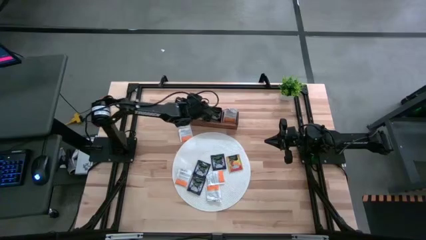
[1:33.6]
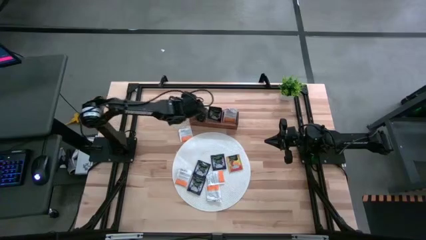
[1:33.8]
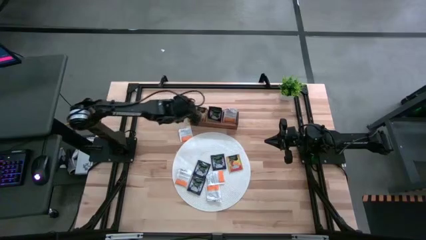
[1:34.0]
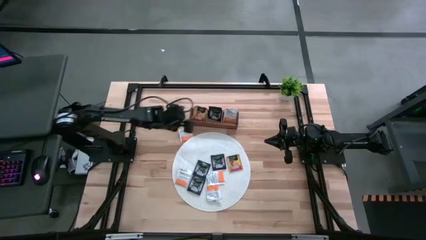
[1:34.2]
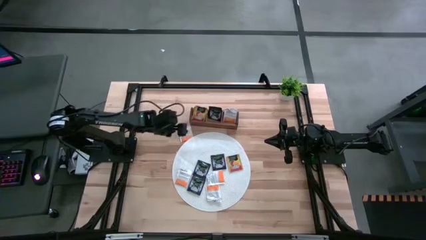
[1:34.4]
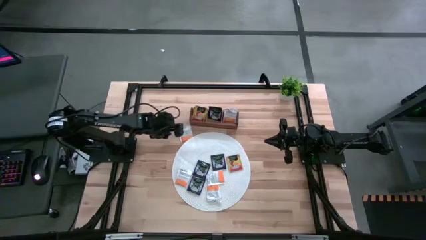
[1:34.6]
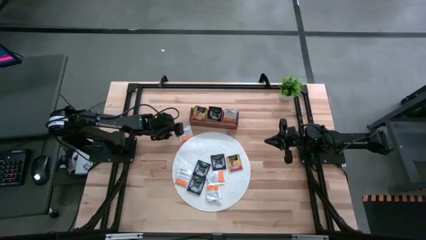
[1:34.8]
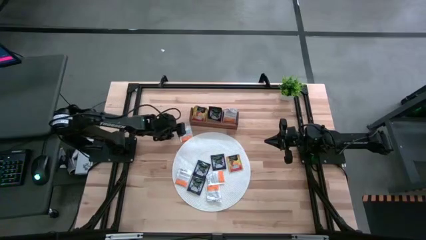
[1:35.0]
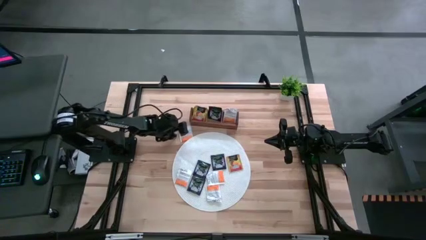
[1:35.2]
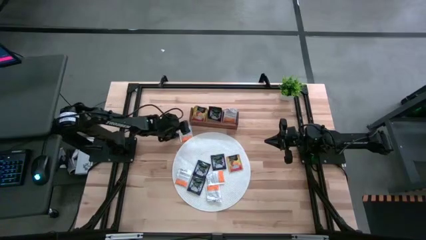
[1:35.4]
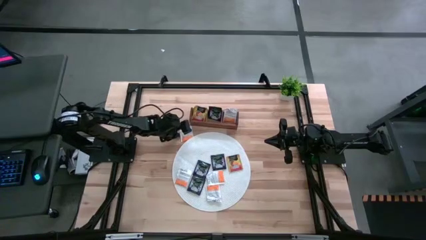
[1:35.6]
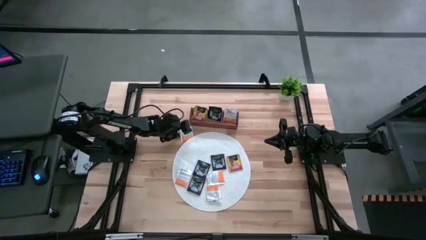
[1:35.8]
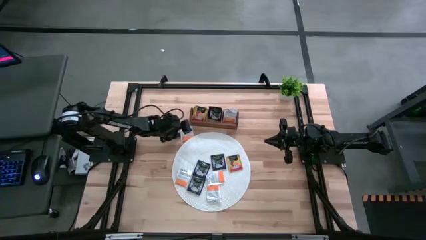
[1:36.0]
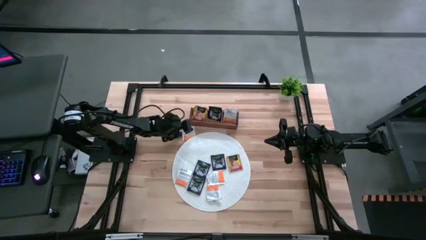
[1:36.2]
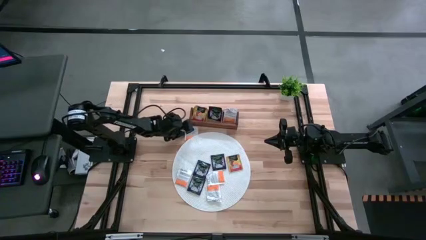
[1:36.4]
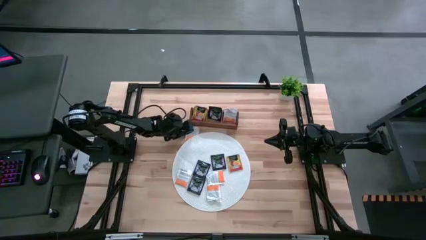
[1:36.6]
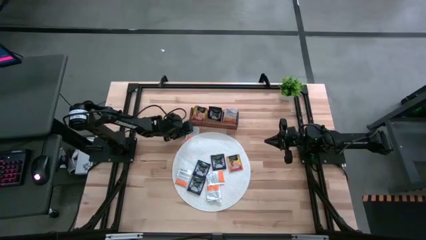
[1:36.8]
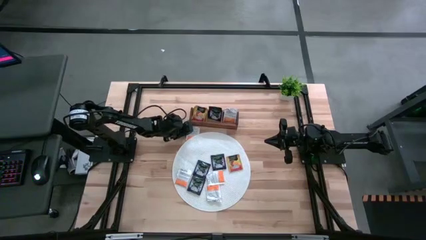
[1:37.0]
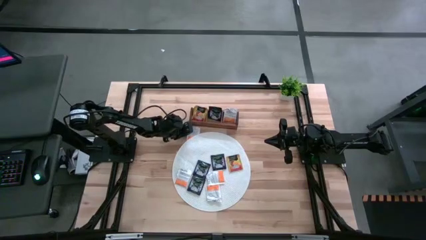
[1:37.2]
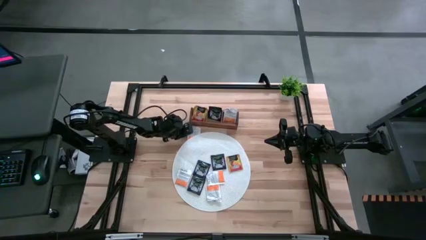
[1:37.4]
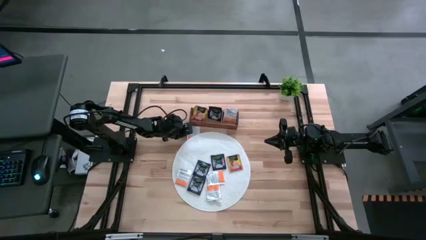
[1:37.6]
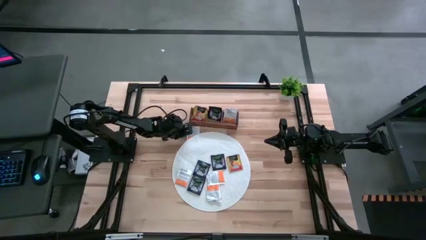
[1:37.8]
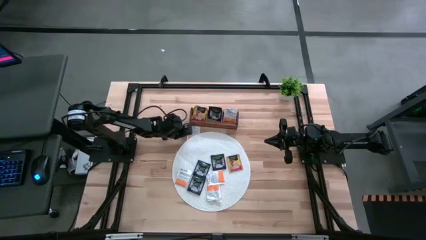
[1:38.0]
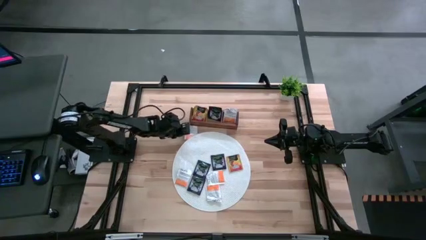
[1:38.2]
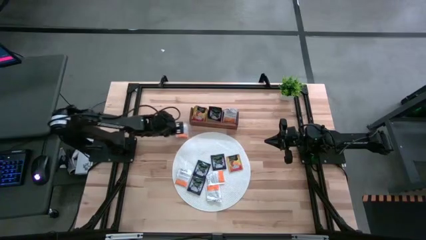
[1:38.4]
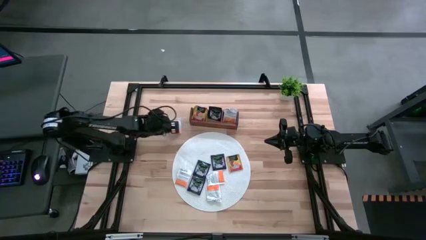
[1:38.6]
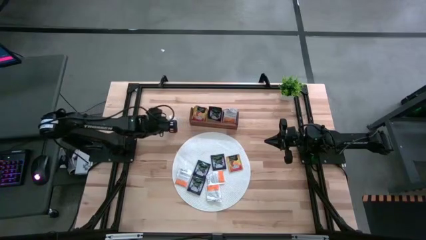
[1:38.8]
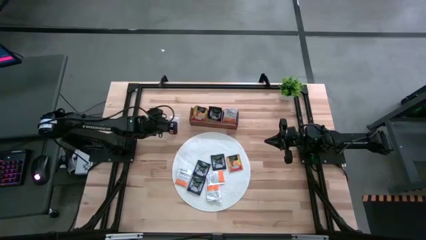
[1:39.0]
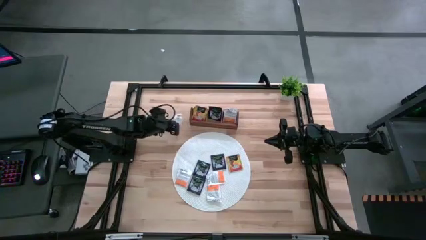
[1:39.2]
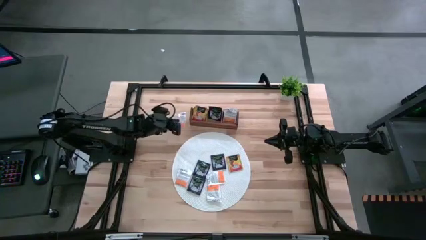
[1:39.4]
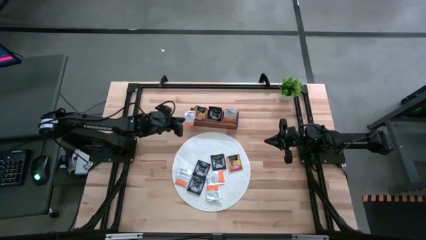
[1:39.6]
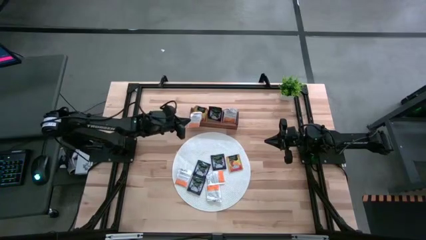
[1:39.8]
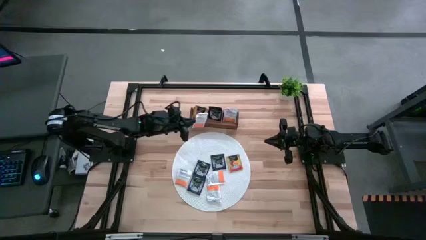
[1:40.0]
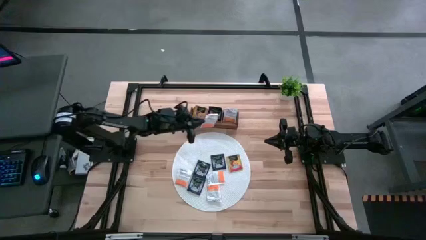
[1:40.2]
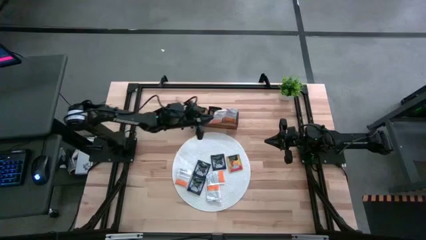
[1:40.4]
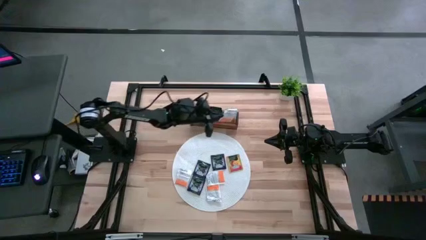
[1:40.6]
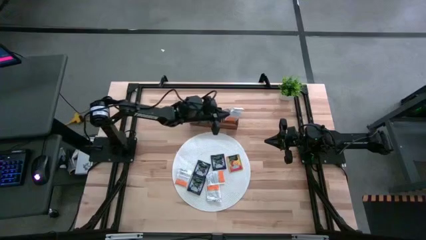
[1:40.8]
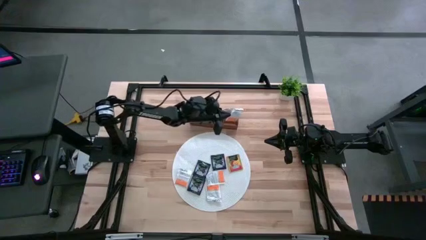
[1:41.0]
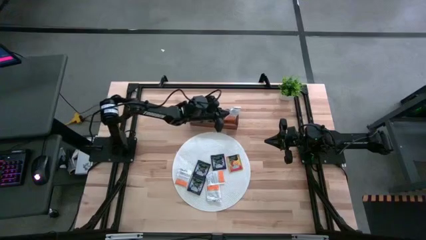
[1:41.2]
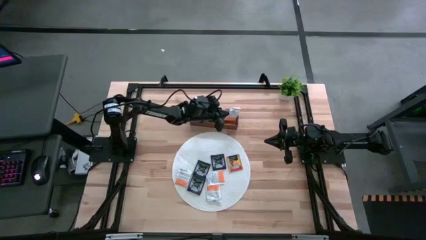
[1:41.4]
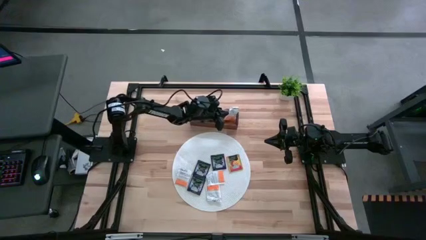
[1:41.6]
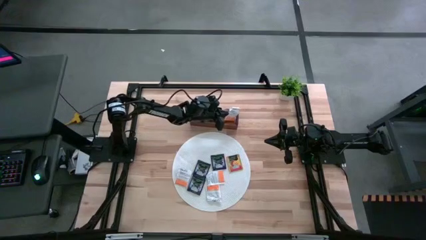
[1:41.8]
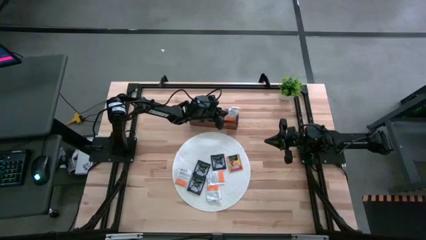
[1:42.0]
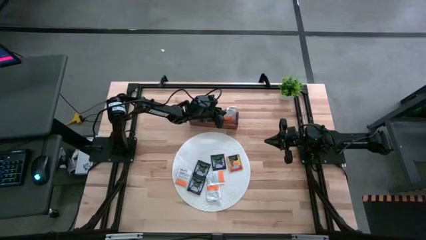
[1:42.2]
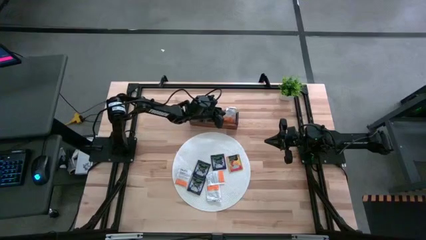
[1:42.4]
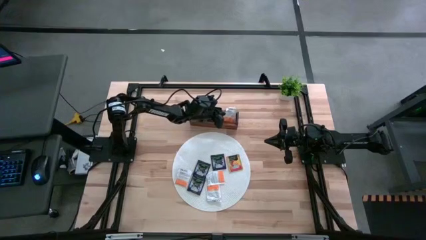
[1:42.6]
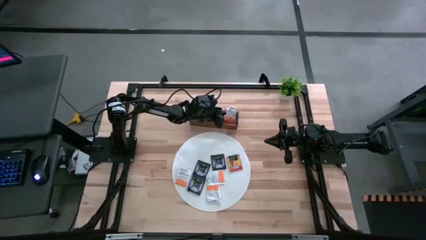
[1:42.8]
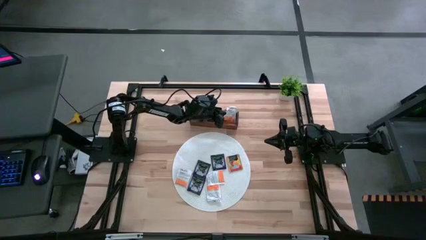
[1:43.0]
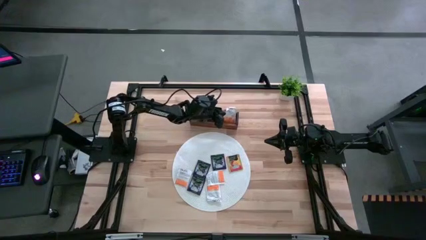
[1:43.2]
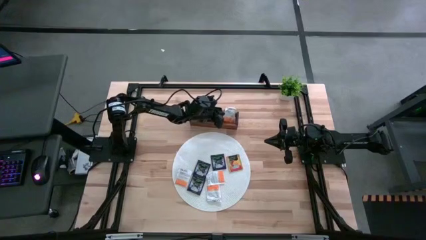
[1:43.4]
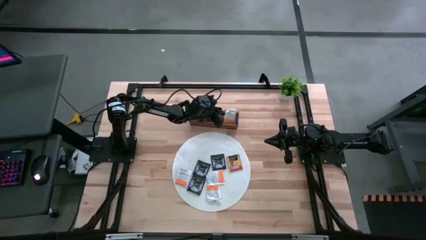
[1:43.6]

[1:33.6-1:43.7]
Task: Pick & Place Tea
Put the white tea bag into the right section of the wooden organizer

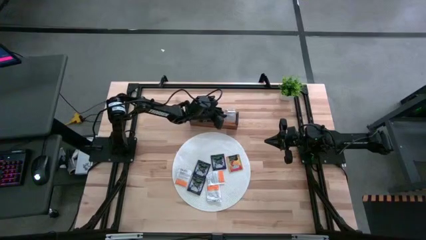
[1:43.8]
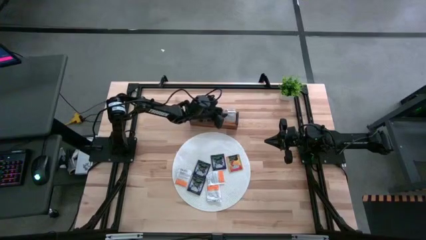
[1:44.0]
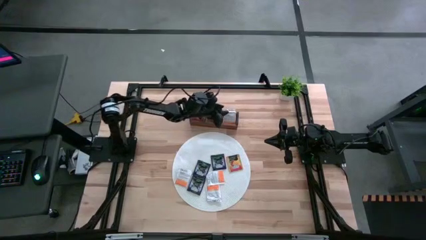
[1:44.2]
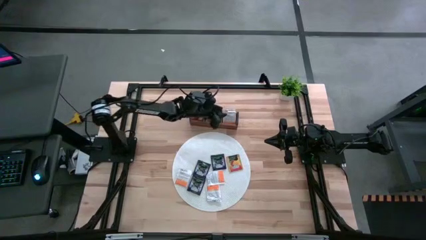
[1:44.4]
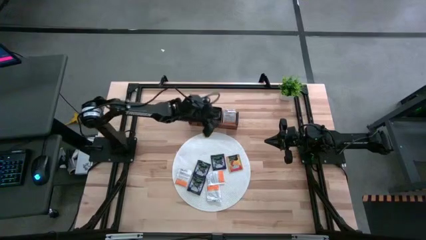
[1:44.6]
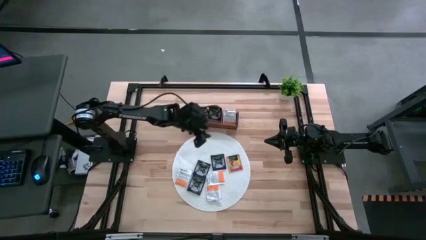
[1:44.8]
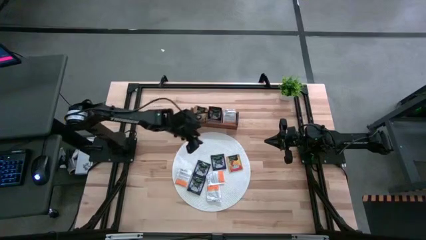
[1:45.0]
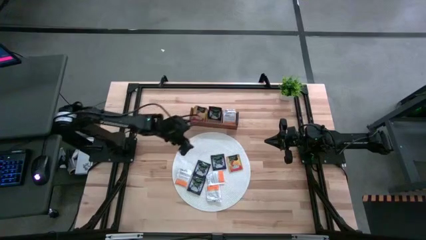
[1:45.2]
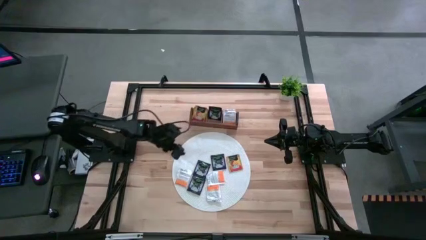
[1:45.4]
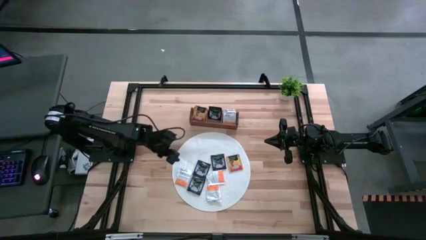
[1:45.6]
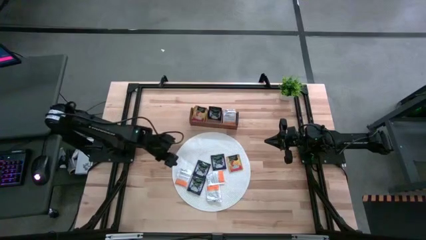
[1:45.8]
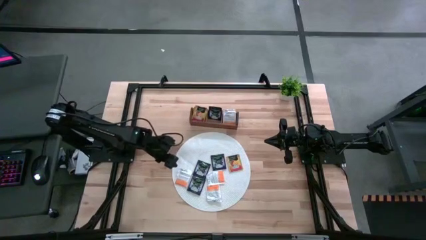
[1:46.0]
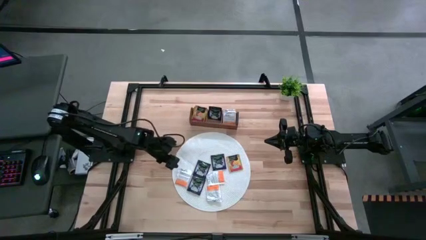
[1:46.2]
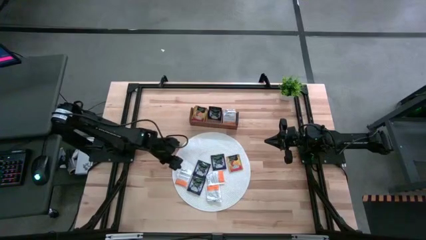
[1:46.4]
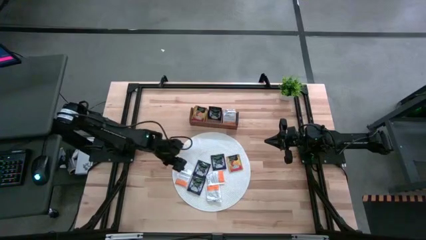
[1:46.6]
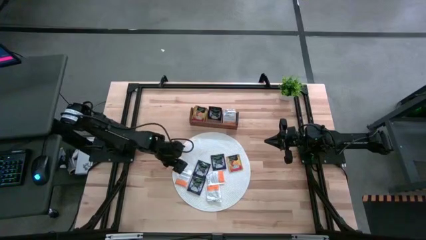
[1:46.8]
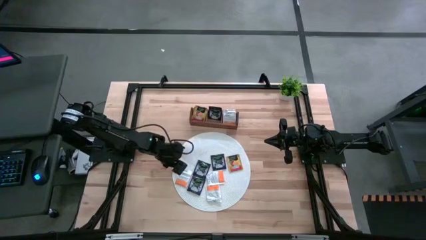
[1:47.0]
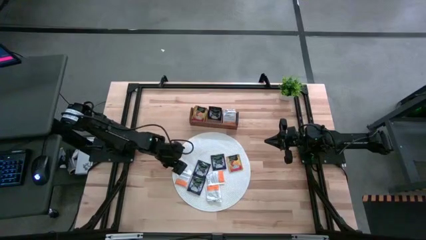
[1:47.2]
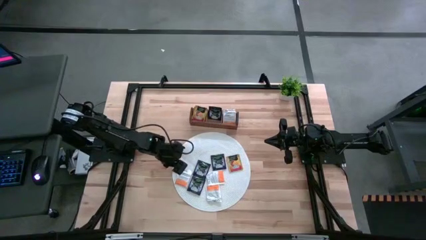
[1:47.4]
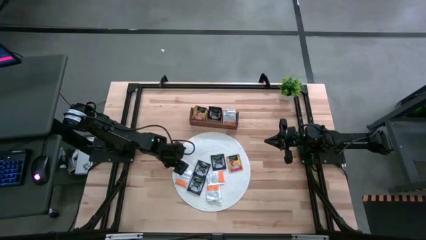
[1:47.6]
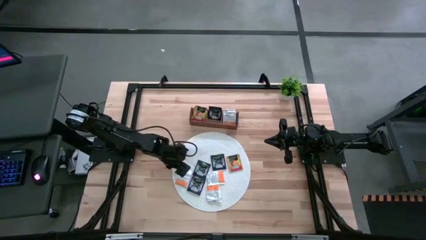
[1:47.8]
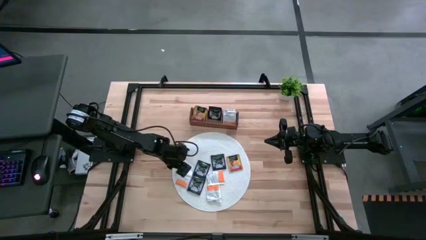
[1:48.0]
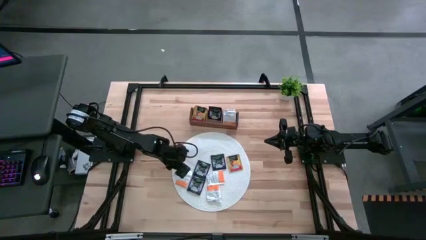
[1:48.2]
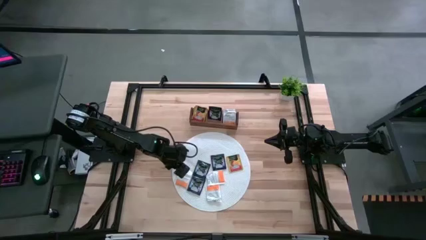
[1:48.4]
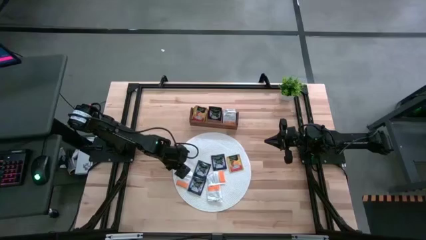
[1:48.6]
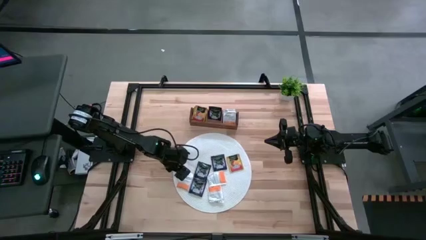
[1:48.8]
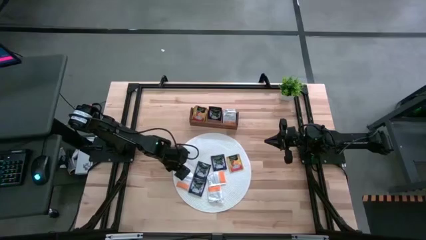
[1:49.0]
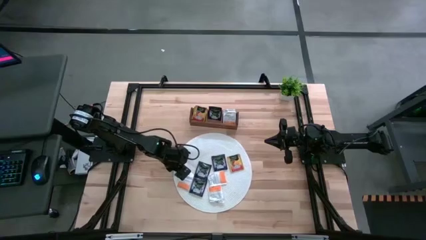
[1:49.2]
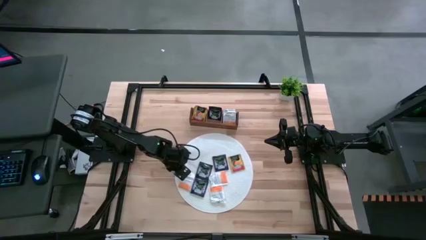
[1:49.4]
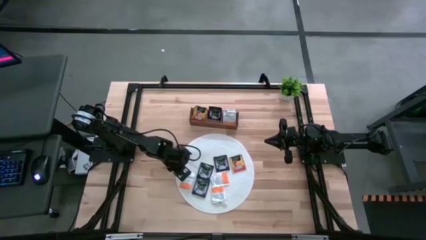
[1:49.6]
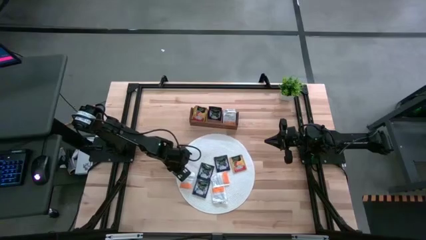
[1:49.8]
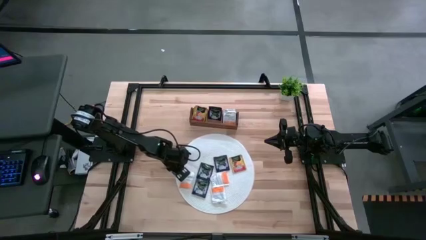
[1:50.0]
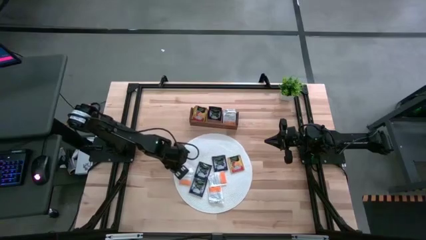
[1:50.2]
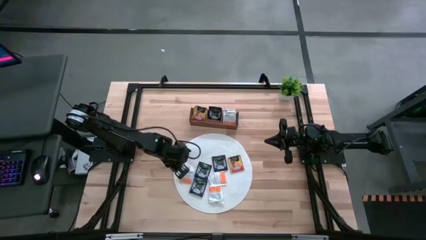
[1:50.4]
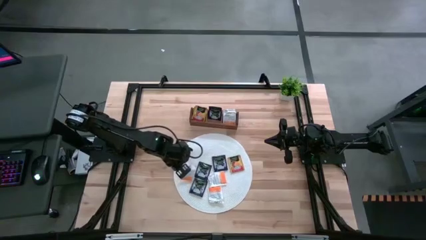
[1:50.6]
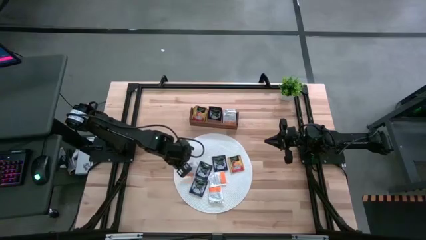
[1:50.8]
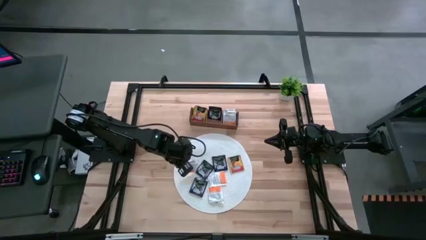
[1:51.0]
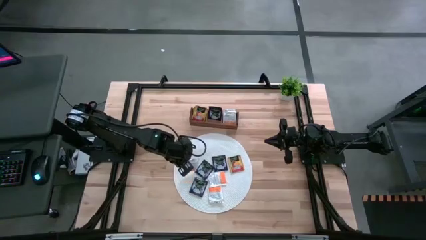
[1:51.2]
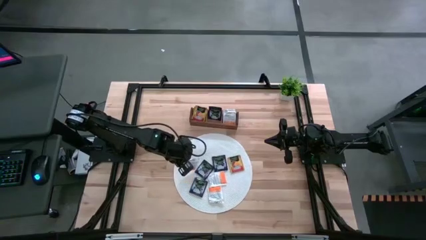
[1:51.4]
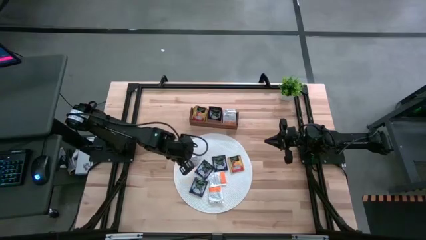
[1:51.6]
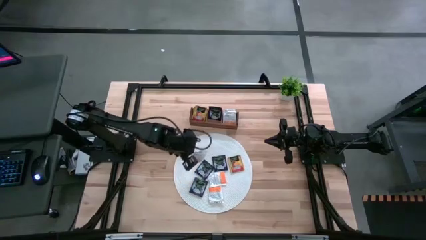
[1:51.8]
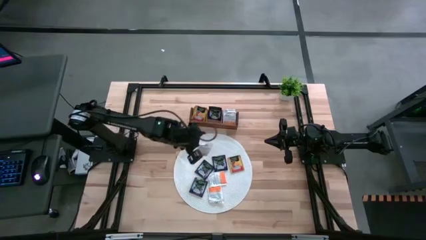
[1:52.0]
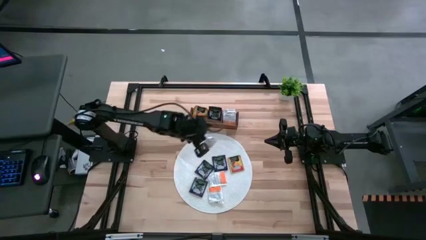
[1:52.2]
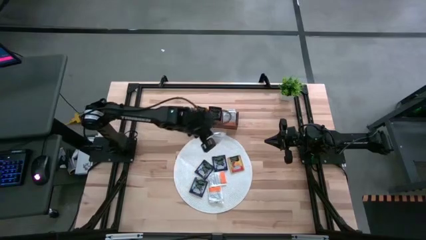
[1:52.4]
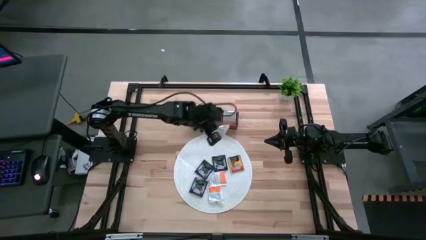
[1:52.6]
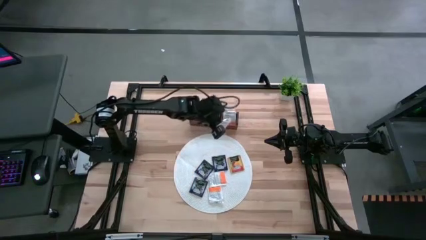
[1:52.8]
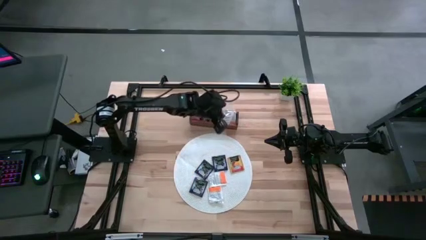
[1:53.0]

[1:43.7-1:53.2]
Put the white tea bag into the right section of the wooden organizer
